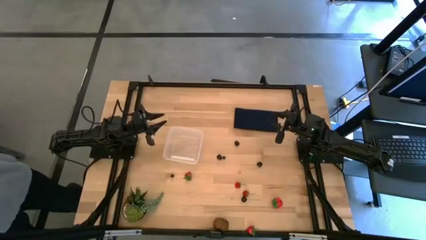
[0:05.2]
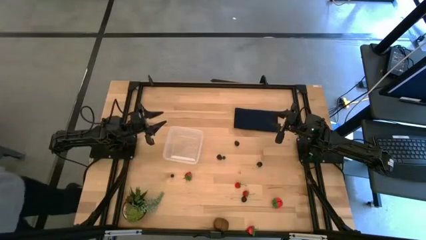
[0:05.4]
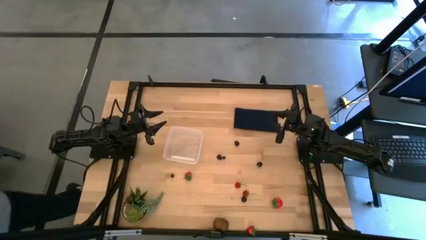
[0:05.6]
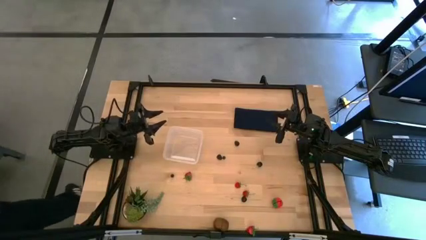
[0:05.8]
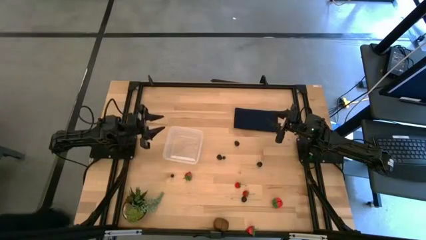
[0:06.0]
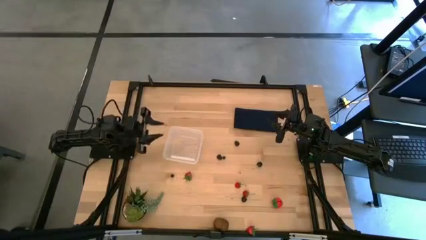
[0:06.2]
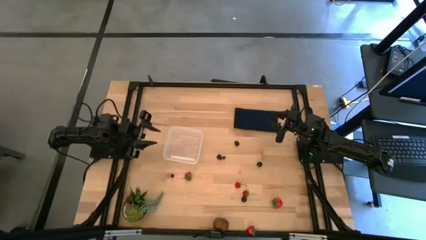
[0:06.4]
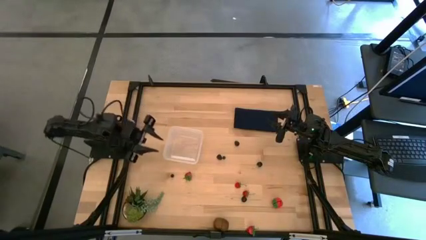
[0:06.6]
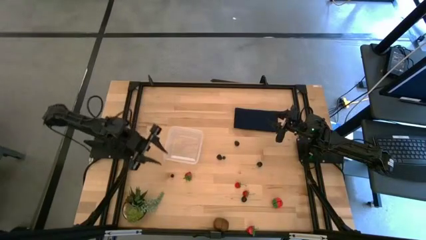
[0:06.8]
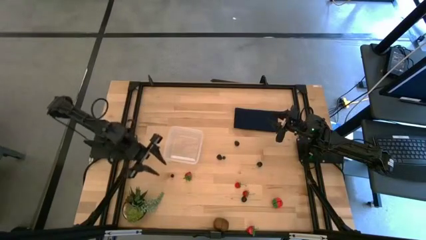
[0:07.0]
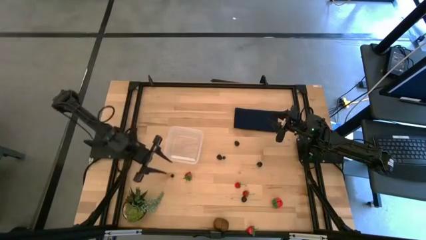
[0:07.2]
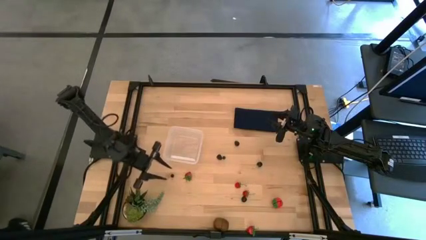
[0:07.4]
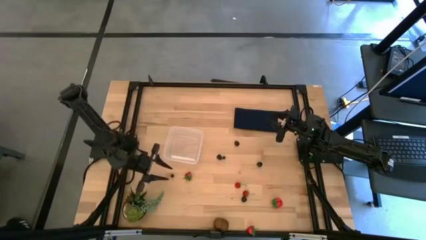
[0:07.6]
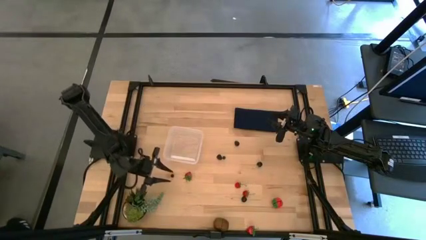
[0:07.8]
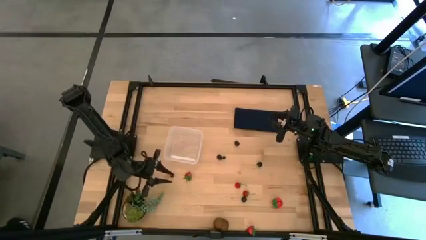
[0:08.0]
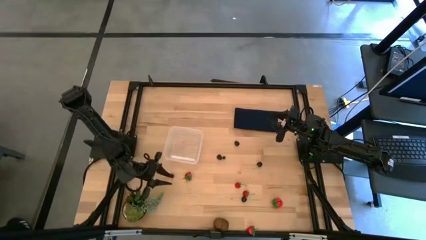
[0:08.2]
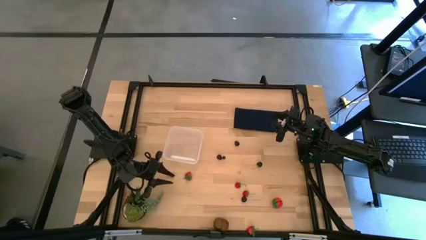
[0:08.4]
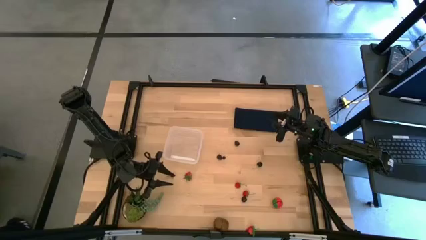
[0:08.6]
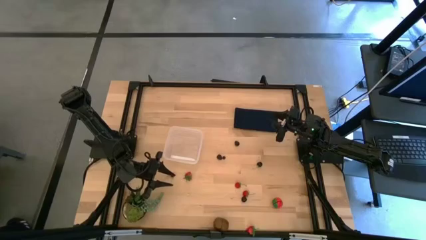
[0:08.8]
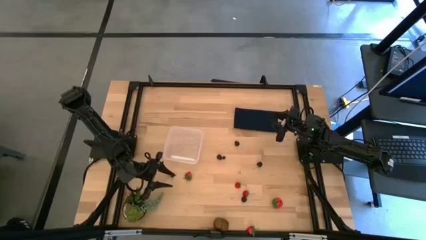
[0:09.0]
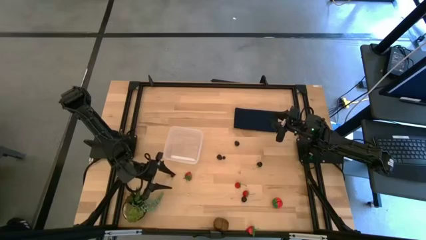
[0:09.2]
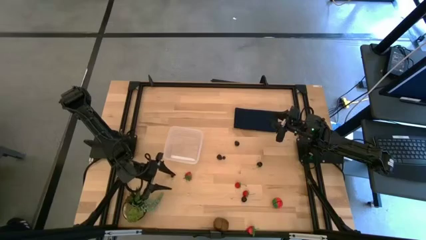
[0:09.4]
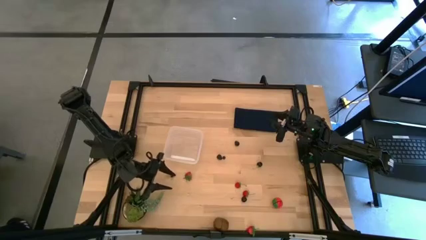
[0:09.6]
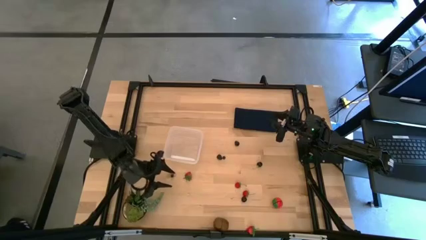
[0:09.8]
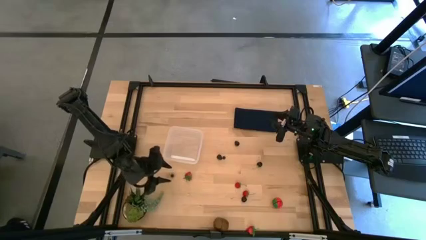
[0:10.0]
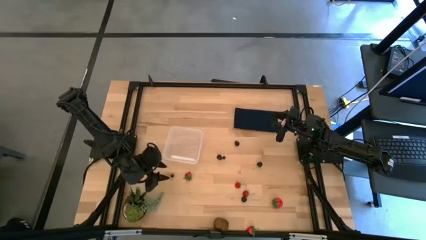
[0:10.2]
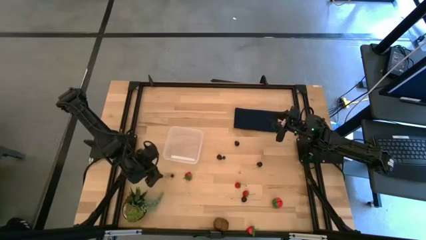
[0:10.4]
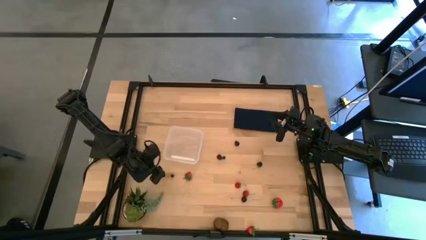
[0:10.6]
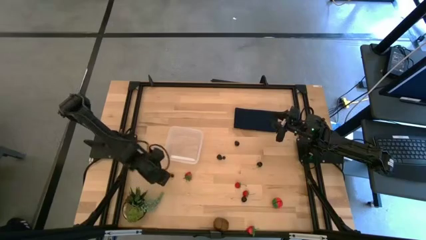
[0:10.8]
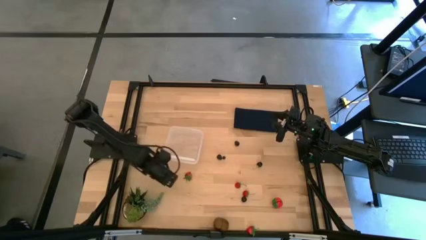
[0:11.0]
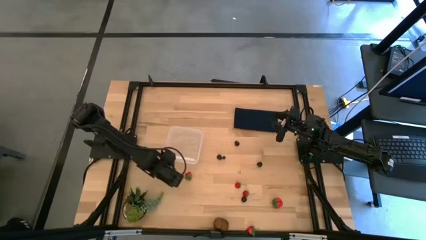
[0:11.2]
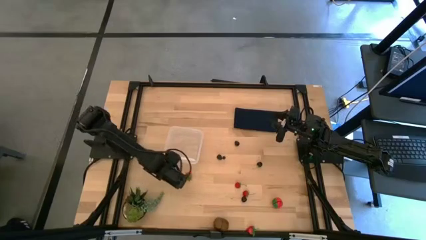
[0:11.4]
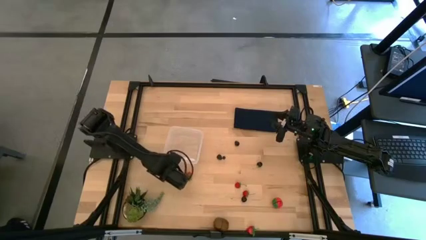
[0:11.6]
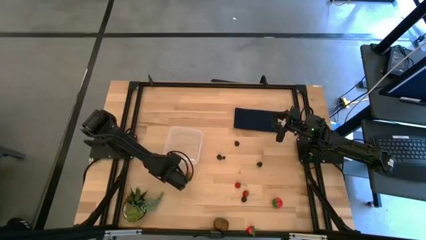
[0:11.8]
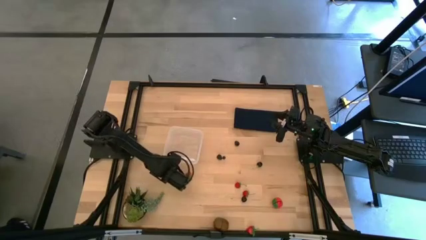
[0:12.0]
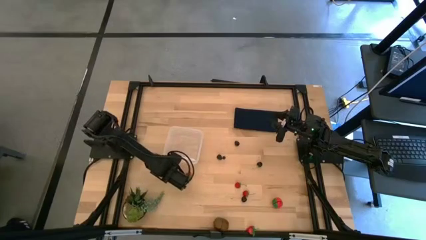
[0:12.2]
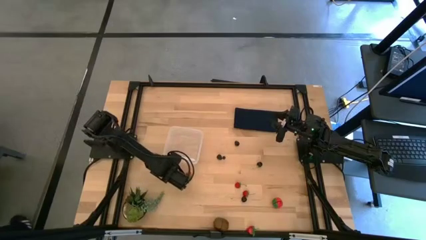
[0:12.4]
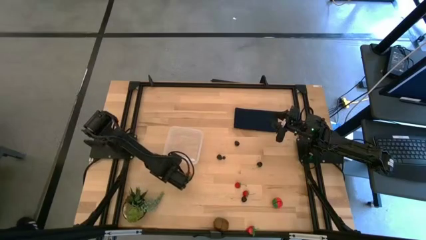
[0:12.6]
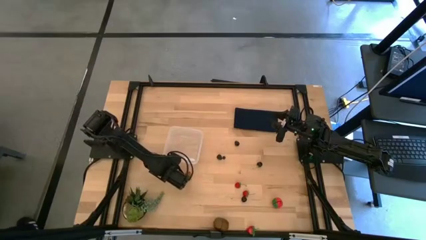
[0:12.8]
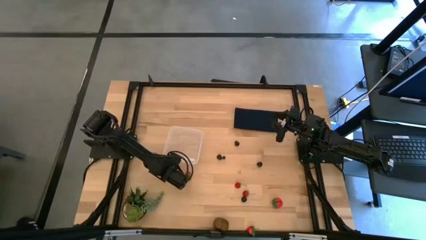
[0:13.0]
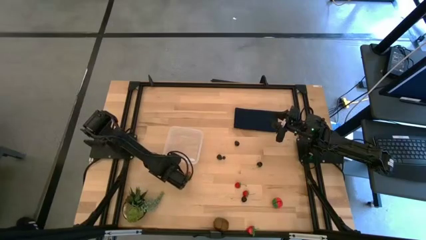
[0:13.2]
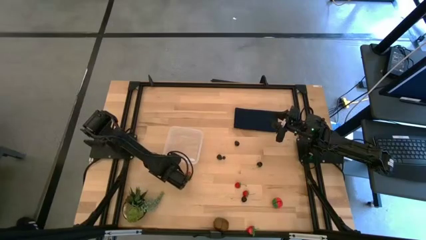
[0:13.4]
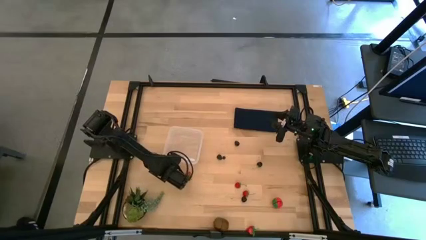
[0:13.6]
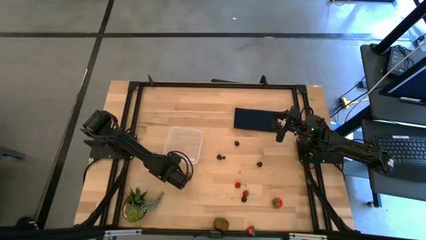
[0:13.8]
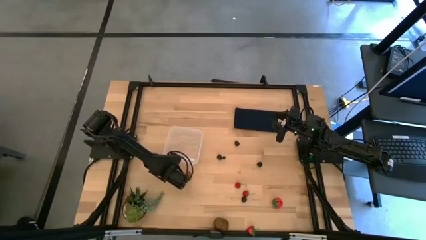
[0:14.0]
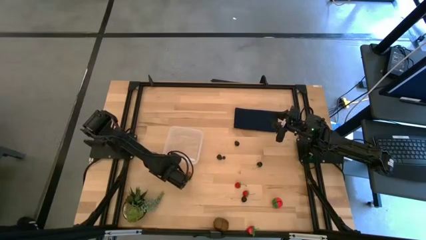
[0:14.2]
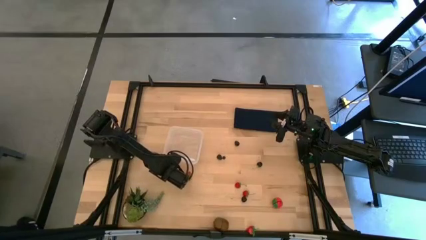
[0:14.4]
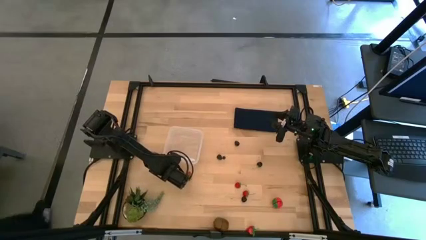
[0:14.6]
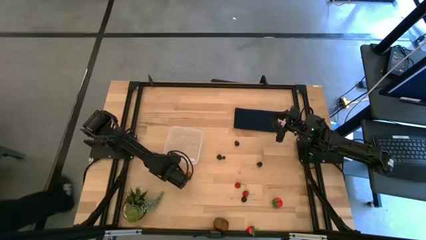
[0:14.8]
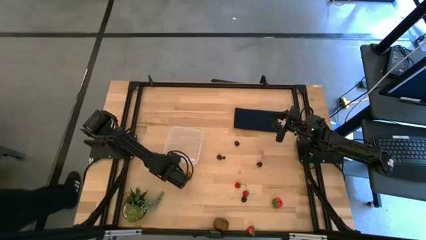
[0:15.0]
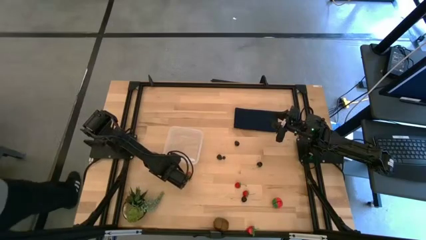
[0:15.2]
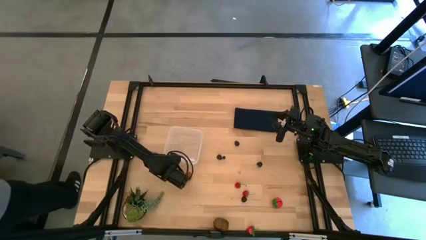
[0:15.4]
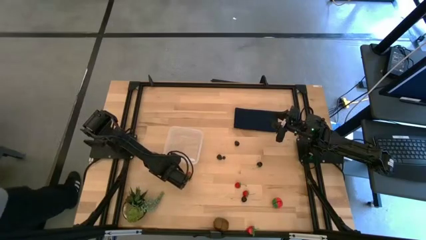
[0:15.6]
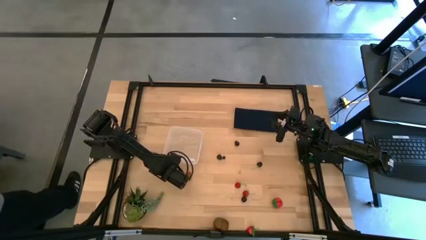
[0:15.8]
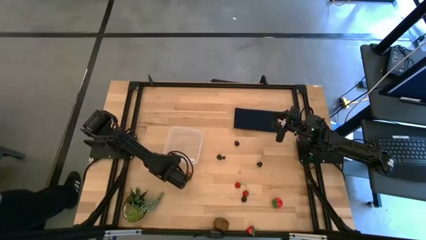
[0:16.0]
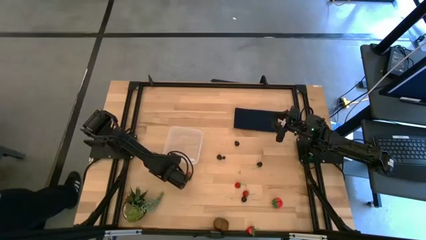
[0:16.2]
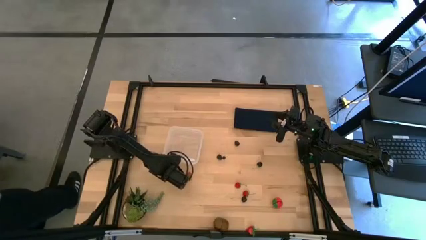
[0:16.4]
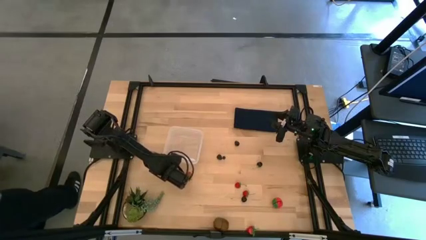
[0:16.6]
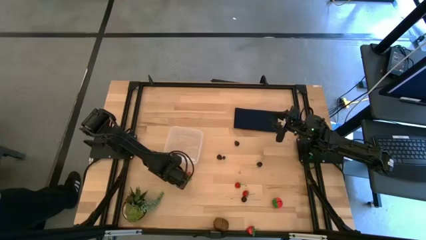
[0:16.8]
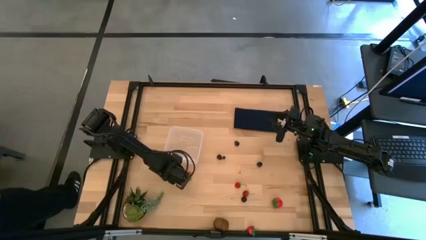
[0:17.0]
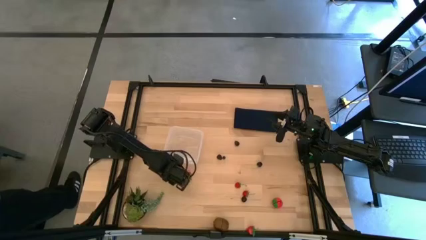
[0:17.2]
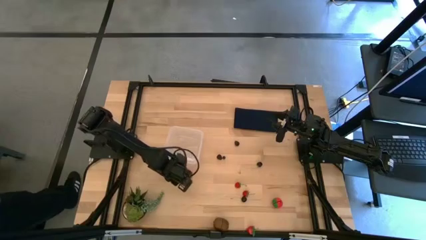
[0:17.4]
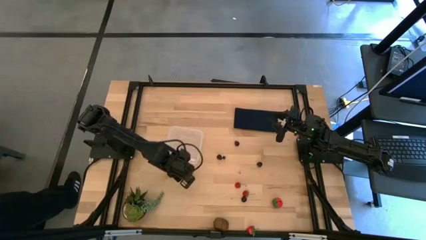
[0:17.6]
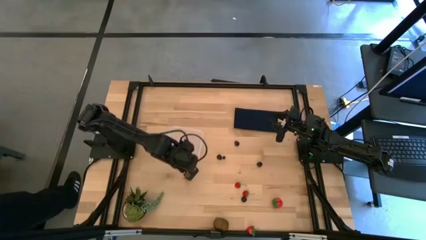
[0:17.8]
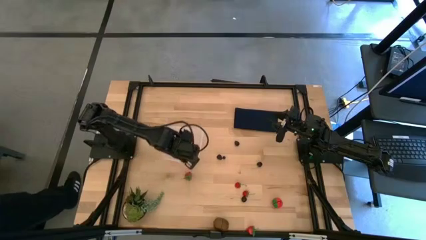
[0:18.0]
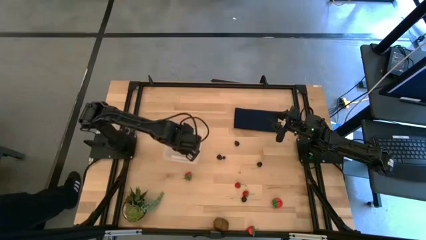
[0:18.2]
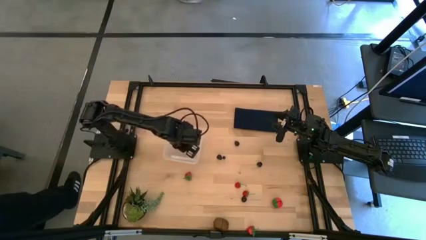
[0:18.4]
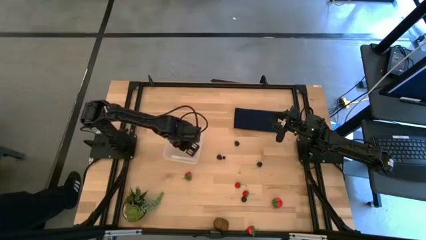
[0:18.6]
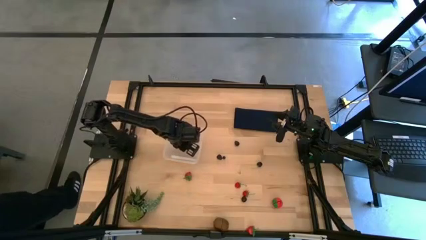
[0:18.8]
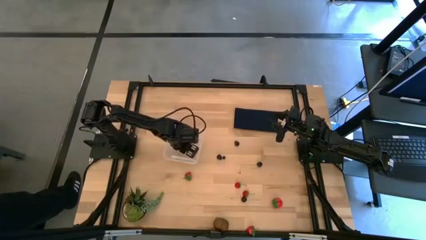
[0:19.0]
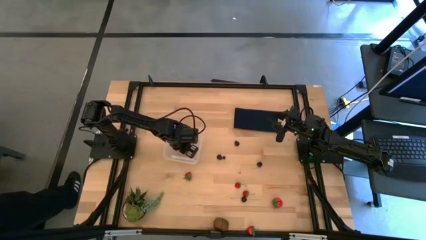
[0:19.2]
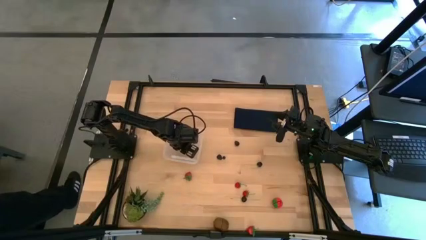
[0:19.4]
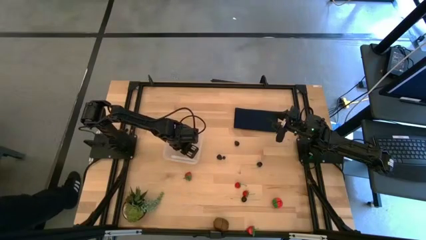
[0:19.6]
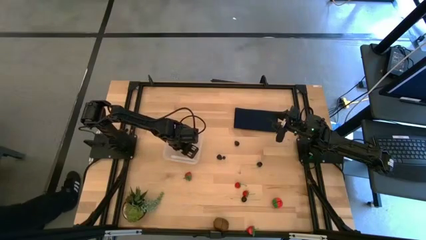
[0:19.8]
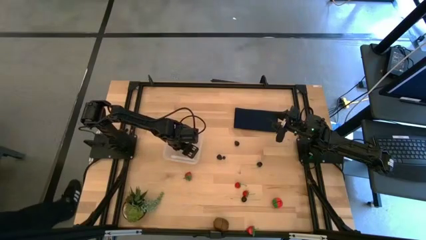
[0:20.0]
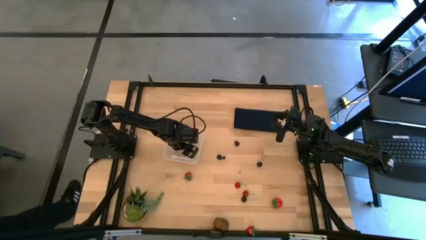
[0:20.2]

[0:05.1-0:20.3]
Task: Pick and placing Produce into tupperware
Put the left blueberry into the transparent bin

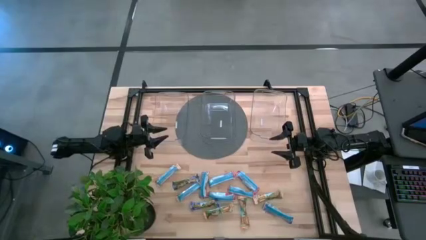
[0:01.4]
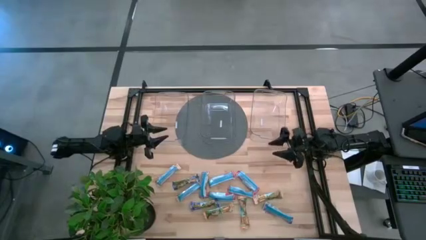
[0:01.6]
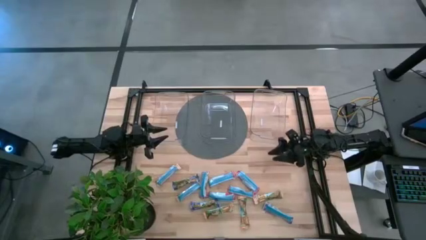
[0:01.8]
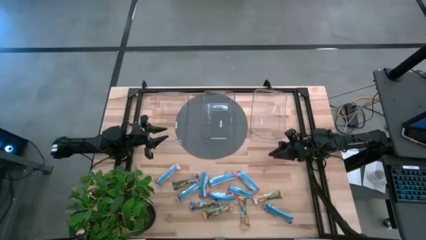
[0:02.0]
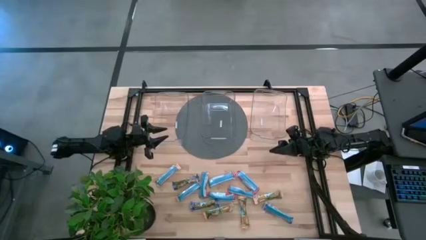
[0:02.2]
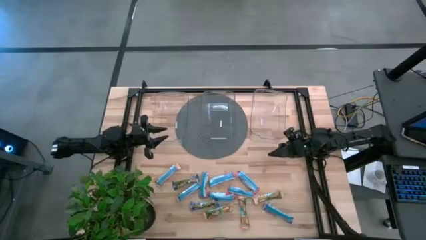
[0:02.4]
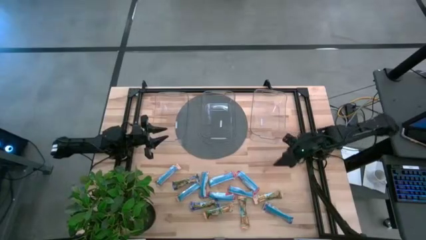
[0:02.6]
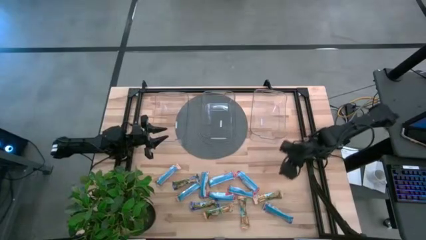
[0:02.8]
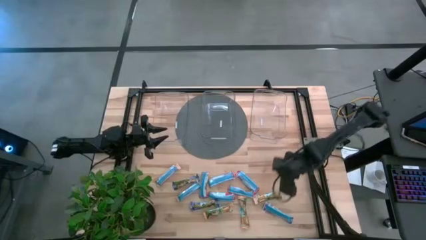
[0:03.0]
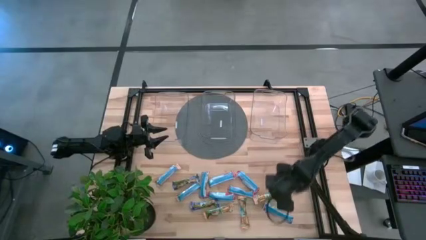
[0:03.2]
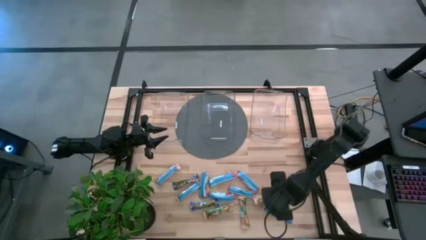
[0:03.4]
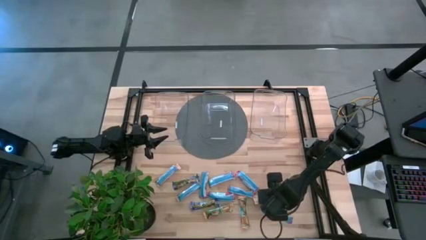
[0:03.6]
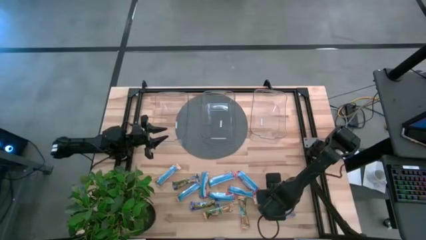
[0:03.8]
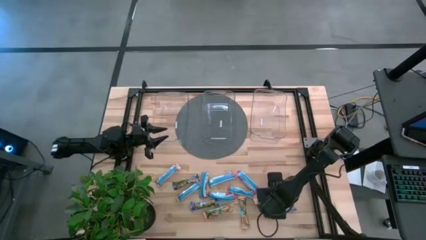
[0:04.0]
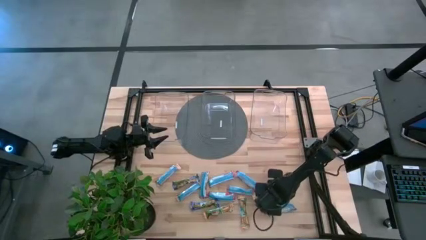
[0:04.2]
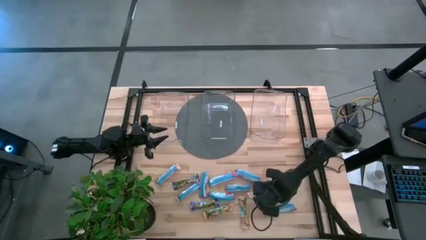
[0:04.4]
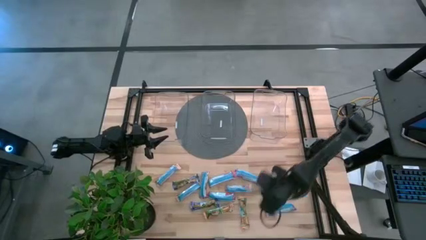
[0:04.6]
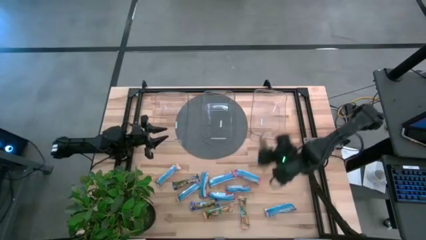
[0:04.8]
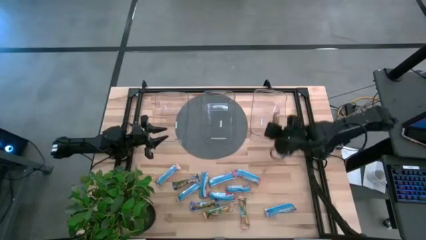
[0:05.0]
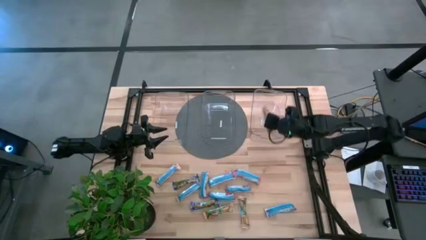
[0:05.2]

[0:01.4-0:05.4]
Task: Pick and place Granola Bars by type
Put the yellow granola bar into the right transparent bin
